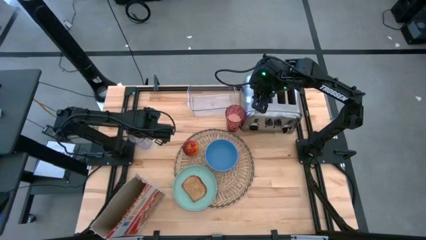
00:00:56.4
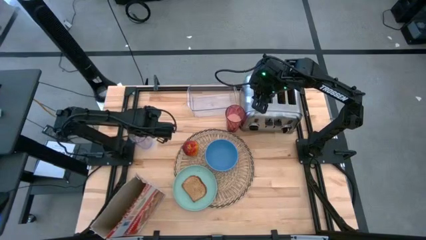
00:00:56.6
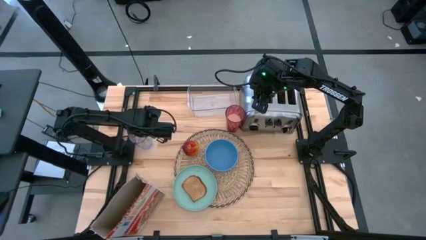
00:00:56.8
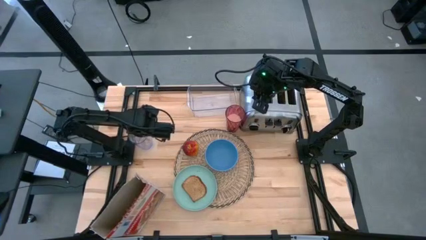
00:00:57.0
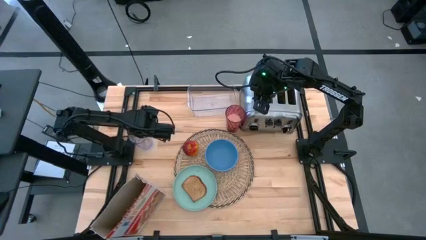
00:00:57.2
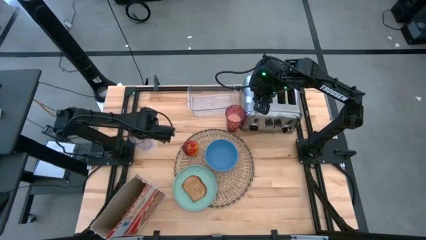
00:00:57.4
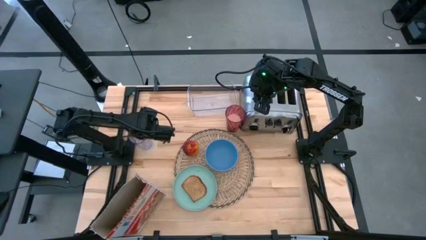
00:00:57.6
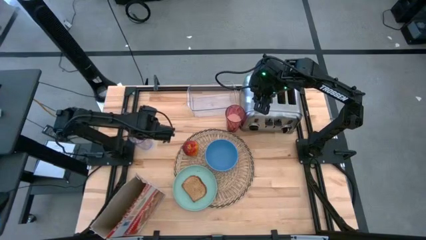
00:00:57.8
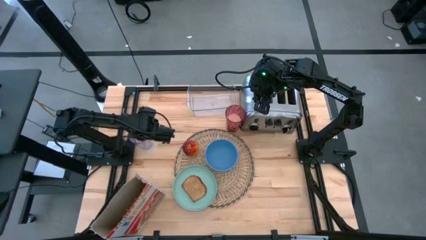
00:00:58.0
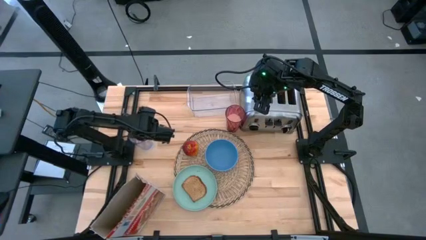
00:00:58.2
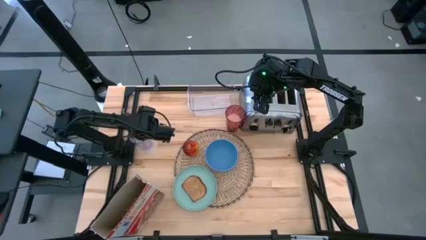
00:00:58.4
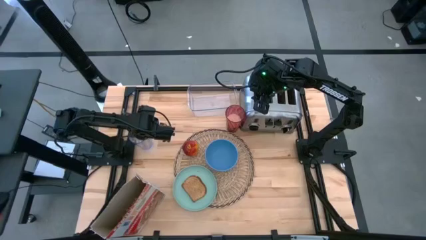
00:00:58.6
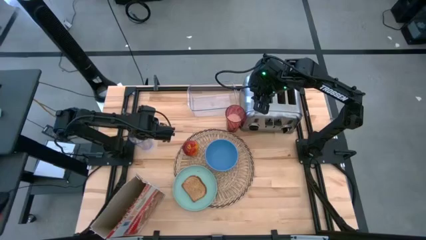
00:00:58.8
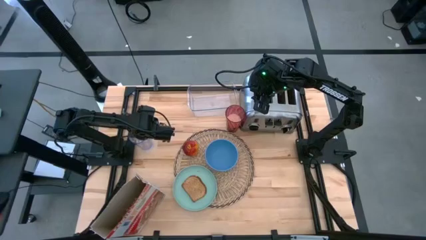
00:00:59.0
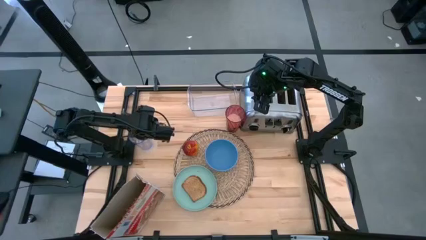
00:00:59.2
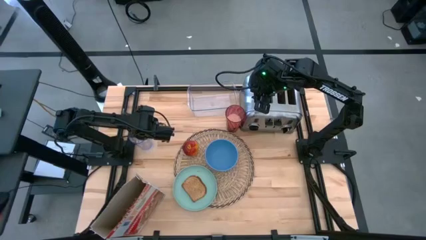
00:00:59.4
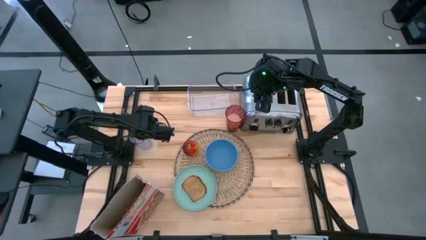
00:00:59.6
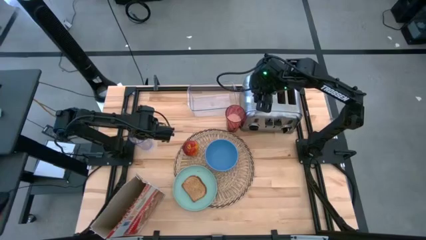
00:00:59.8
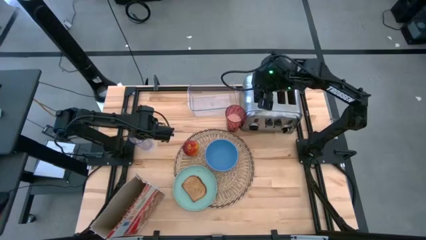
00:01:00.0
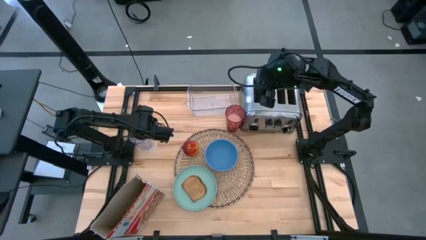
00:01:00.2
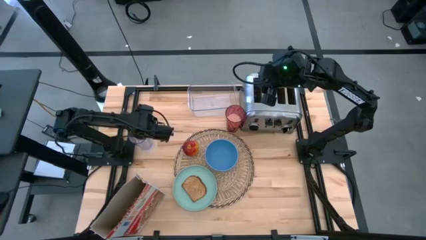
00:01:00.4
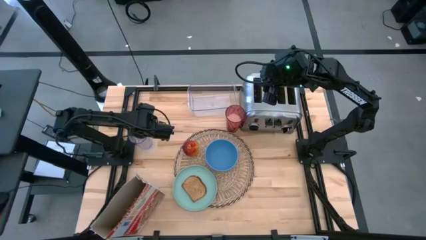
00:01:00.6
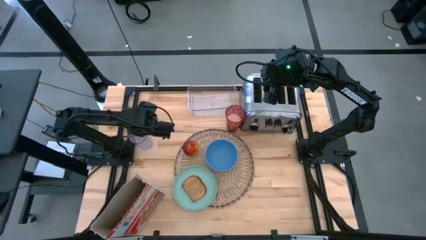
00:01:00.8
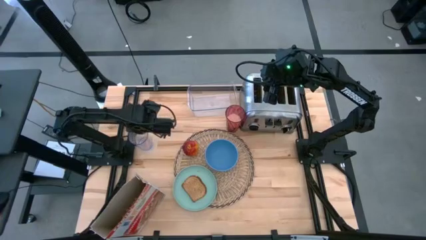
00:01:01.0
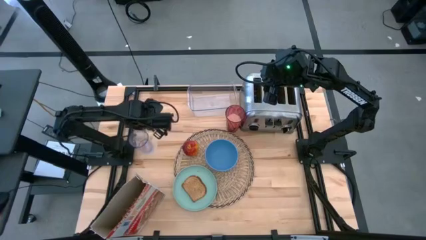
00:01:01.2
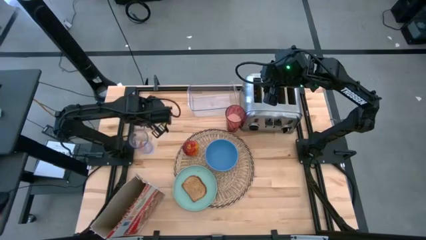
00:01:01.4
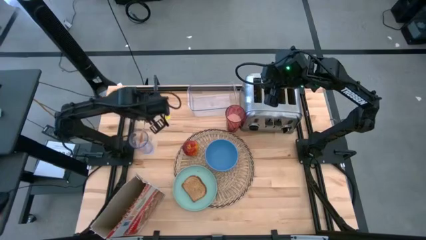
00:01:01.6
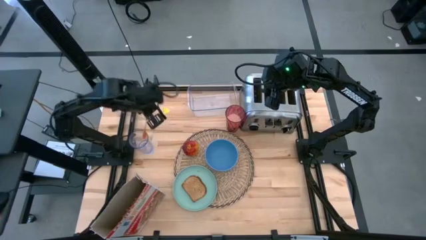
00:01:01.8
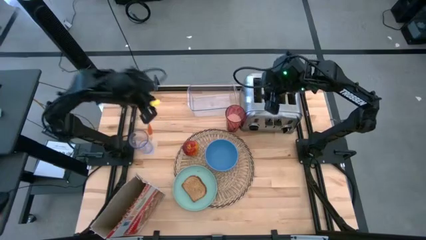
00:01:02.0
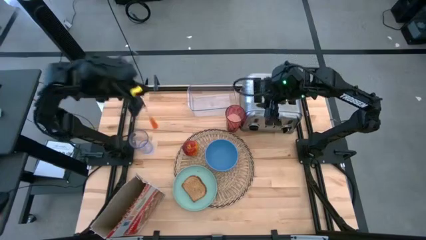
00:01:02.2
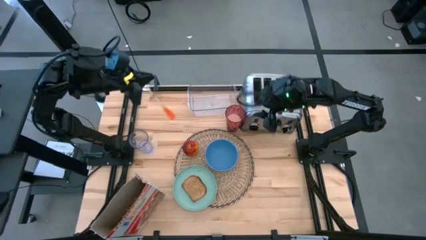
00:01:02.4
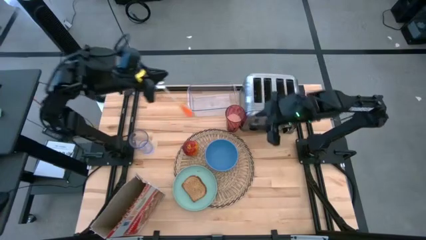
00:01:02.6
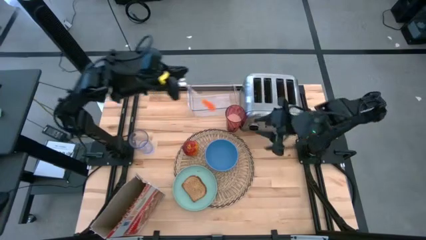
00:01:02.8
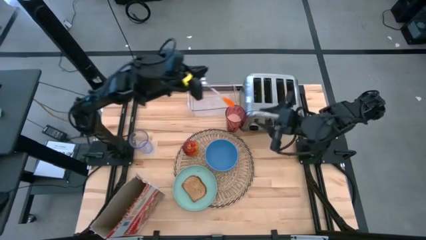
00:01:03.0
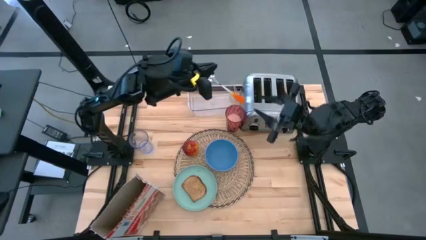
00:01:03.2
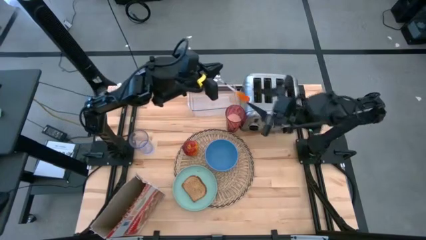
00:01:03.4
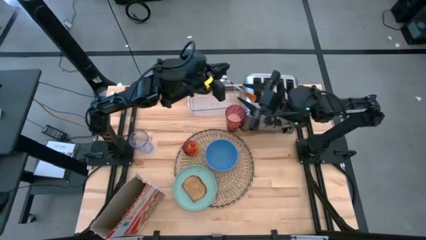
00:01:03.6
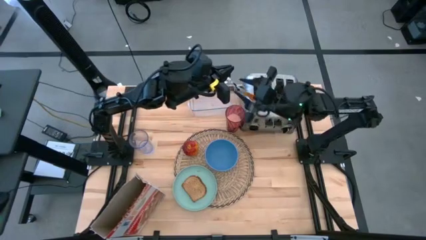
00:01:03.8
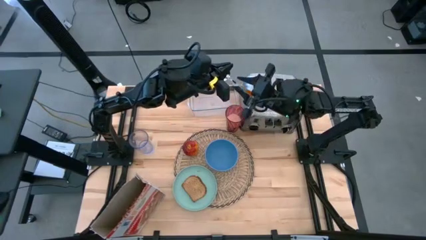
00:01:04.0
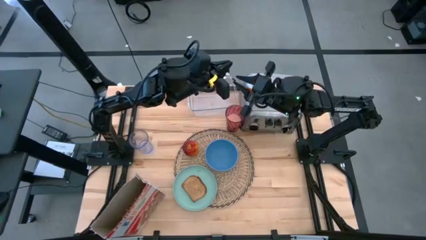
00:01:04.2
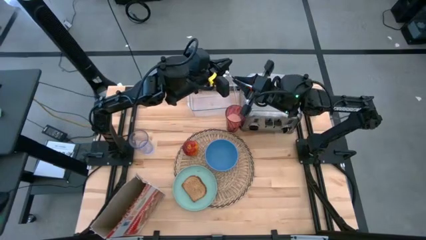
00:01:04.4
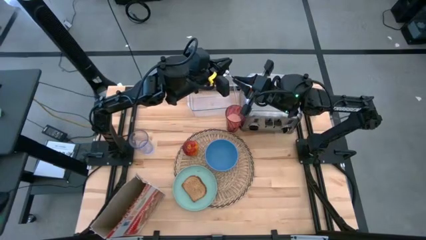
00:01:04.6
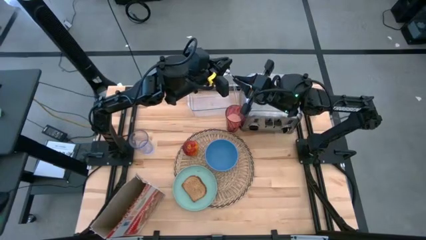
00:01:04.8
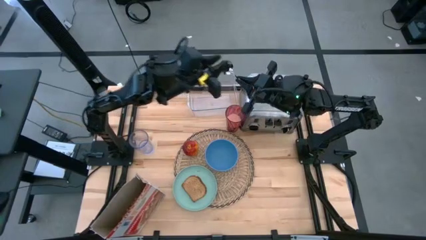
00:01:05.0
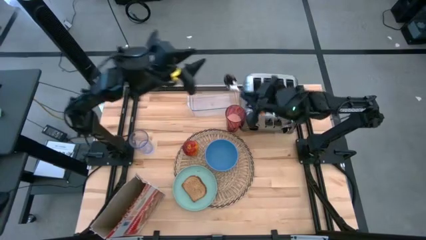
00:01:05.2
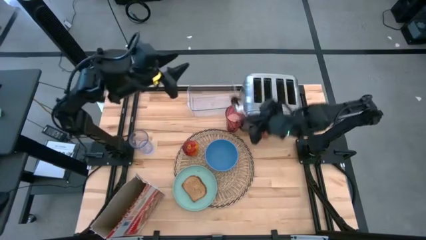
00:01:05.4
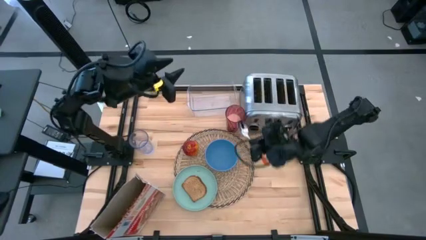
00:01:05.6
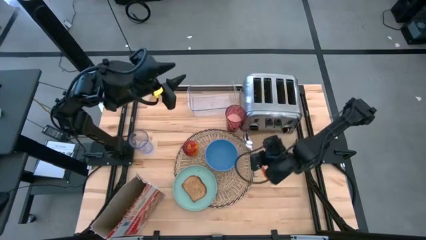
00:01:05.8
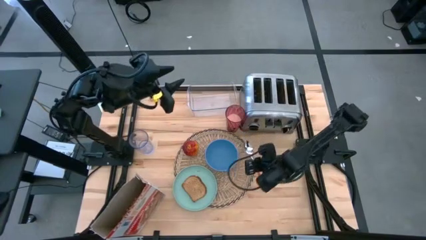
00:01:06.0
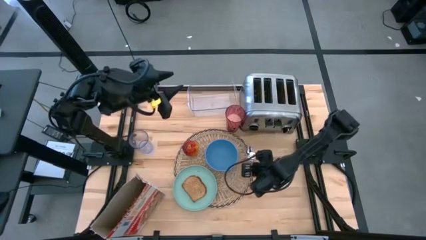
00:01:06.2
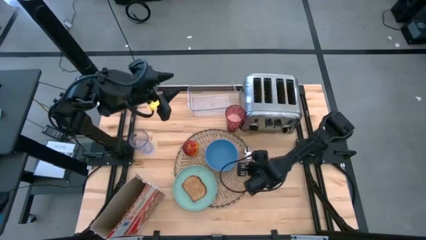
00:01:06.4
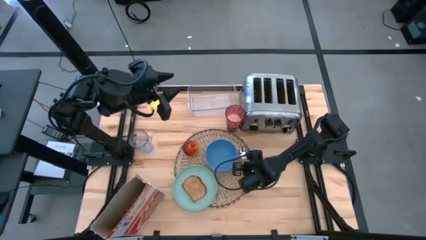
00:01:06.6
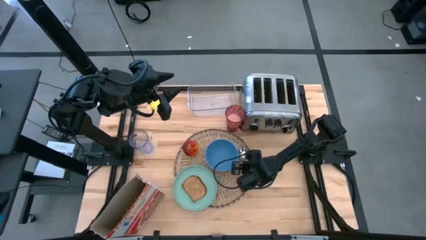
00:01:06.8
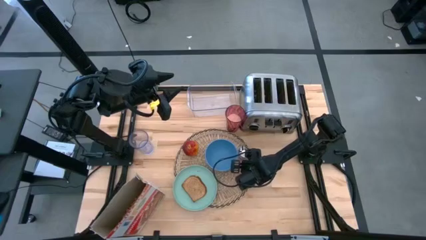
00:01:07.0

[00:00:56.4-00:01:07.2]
Task: Arrange a breakfast setting
Put the orange spoon on the brown table mat to the right of the blue bowl

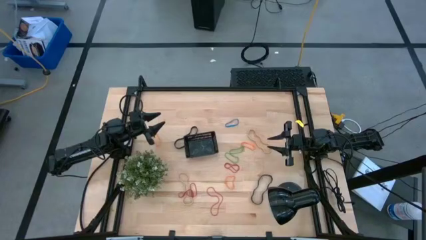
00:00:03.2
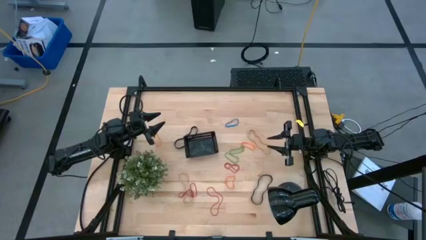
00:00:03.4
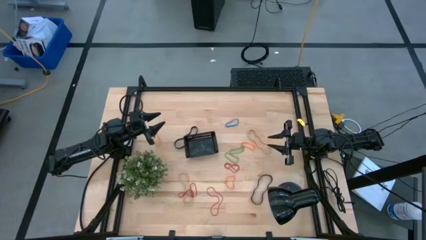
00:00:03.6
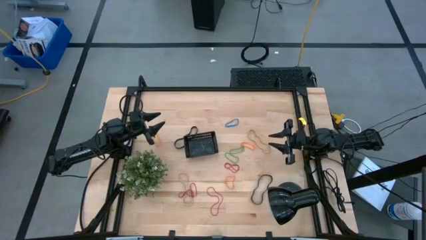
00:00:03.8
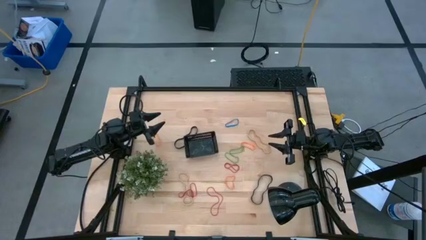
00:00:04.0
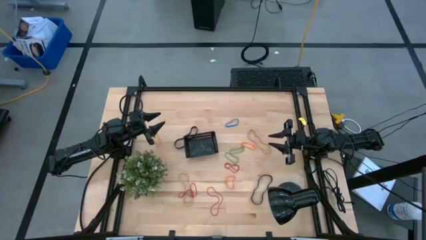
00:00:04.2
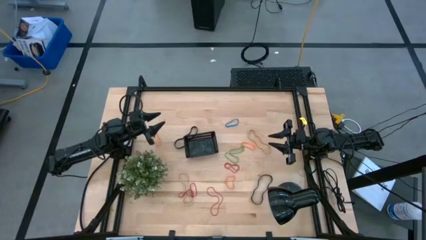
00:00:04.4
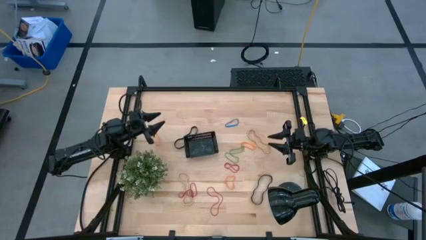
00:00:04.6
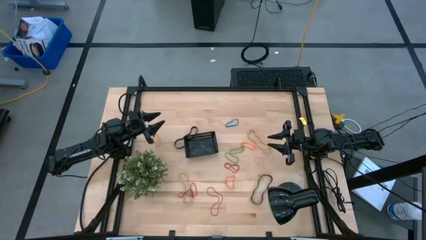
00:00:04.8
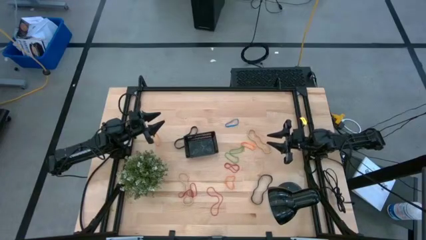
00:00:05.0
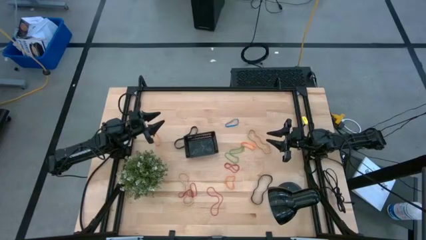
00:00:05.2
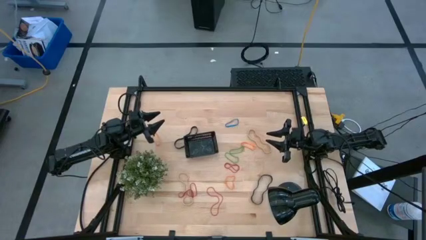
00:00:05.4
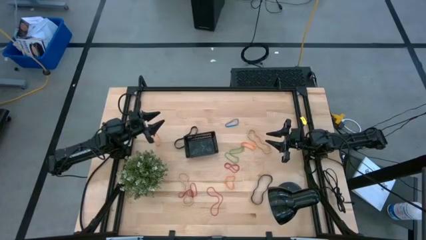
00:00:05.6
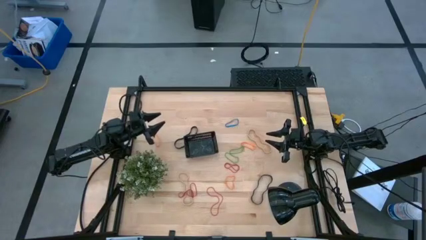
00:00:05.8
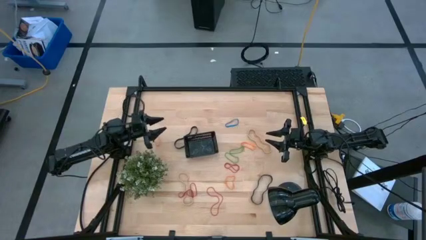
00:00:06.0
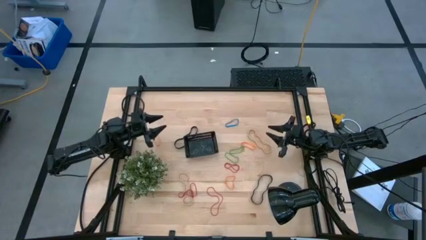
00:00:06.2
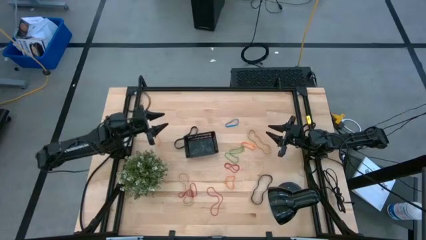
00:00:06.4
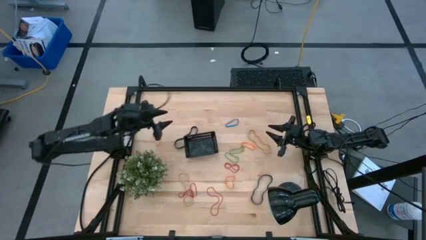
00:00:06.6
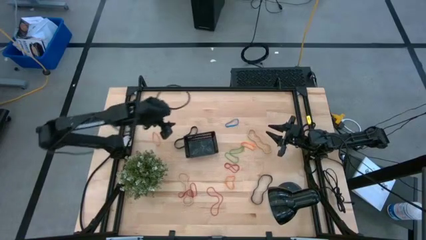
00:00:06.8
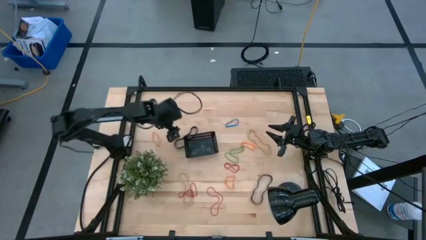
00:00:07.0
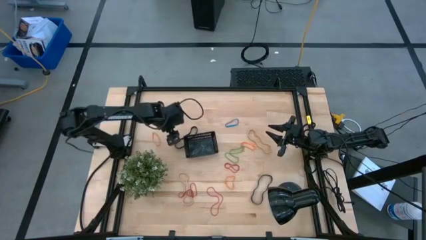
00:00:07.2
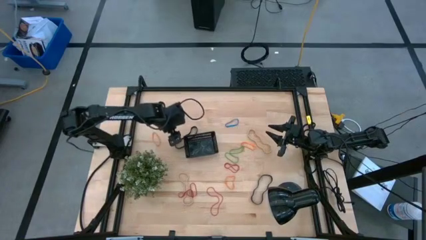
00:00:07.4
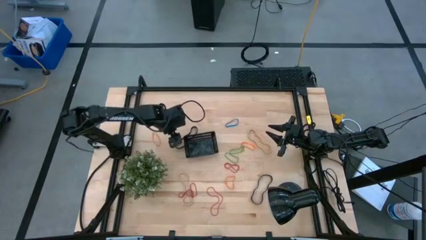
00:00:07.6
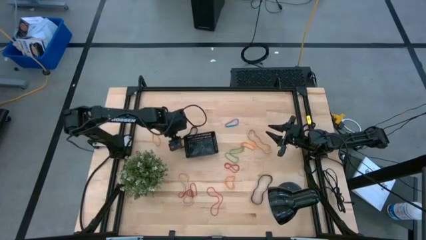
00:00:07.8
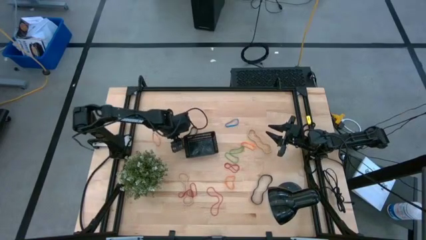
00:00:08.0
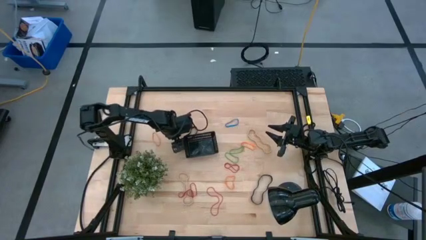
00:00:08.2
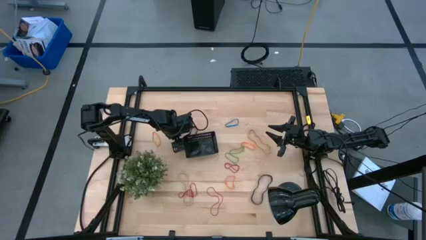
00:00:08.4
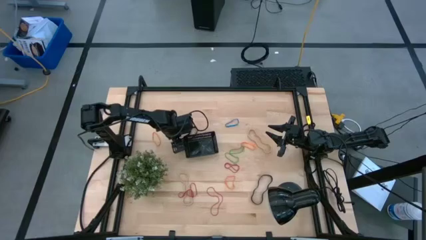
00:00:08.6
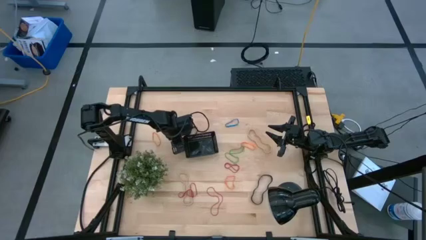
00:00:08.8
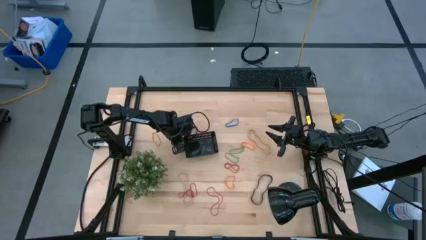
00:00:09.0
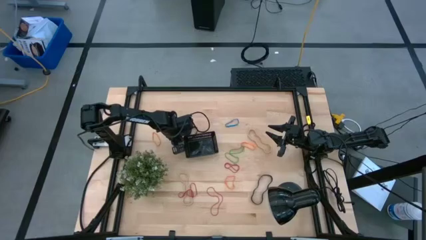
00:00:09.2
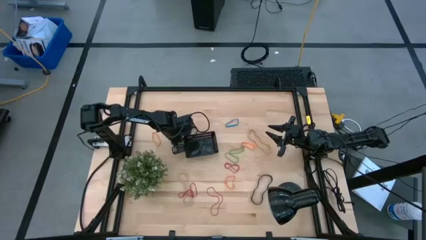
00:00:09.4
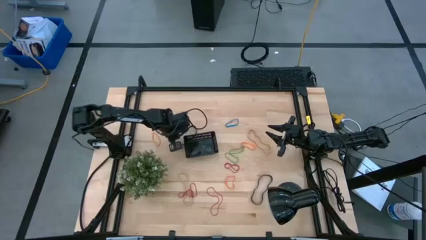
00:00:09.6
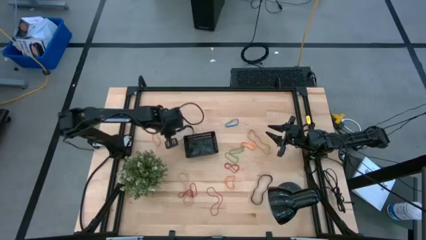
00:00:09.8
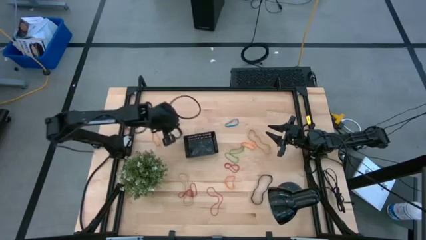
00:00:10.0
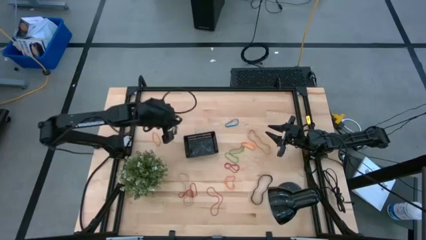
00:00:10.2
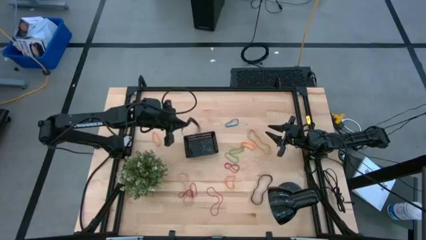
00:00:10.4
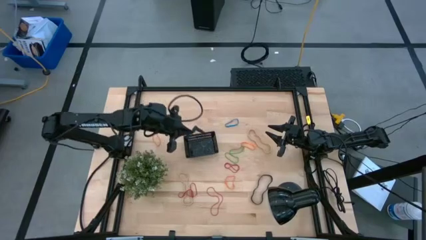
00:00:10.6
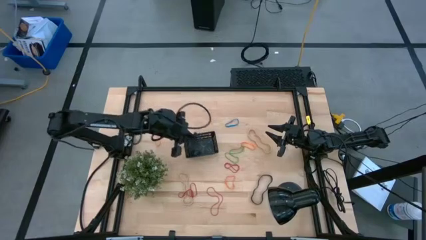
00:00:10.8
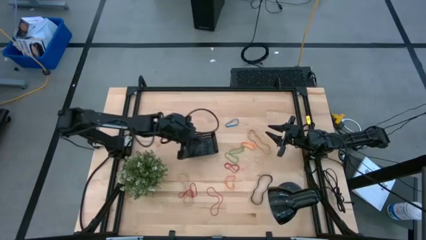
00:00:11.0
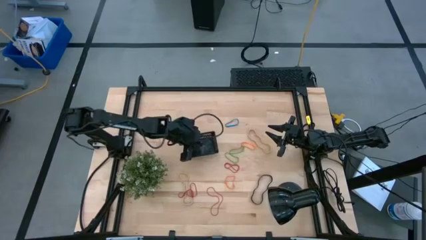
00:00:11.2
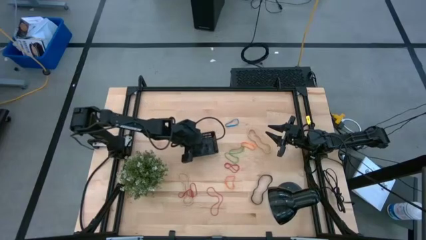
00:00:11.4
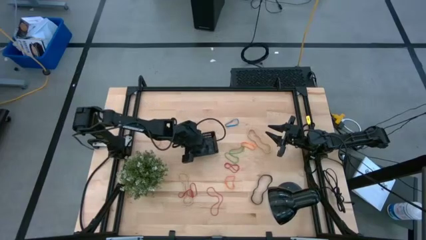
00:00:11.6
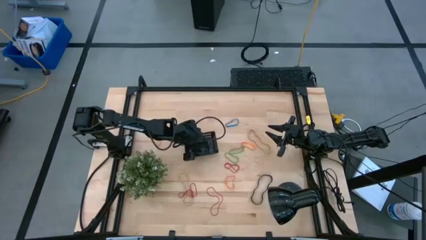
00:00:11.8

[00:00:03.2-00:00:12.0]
Task: Pick and place rubber bands into bin
Put the top black rubber band into the black bin
